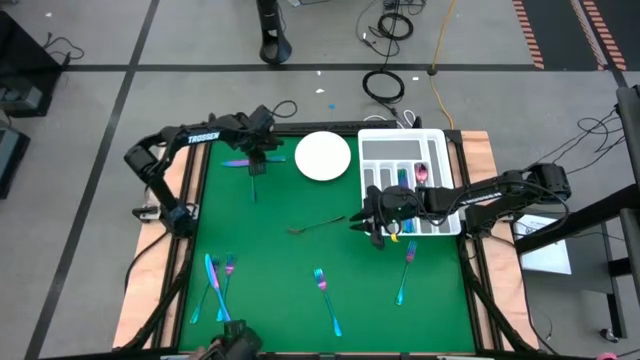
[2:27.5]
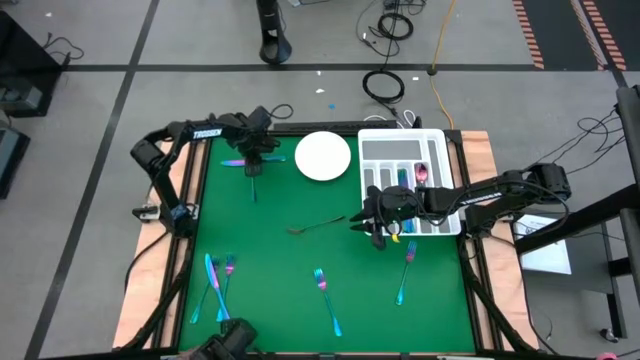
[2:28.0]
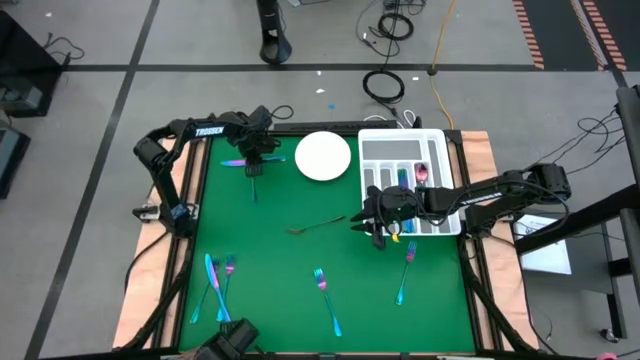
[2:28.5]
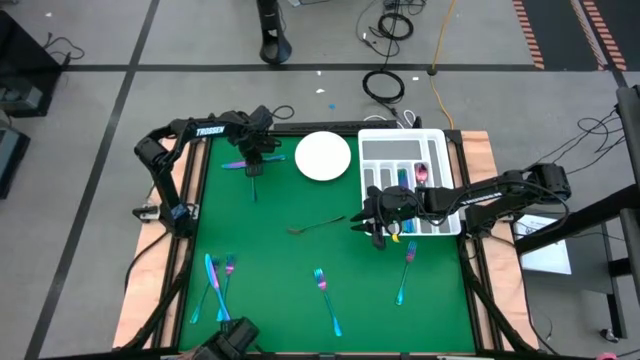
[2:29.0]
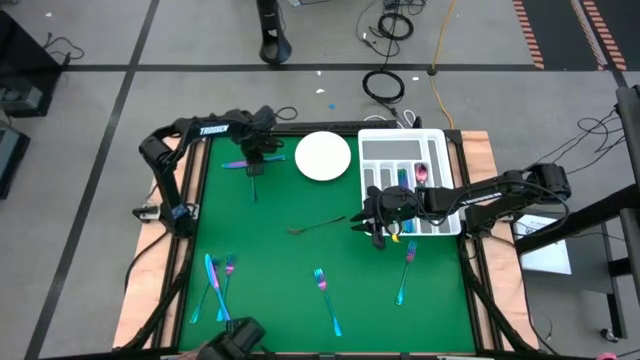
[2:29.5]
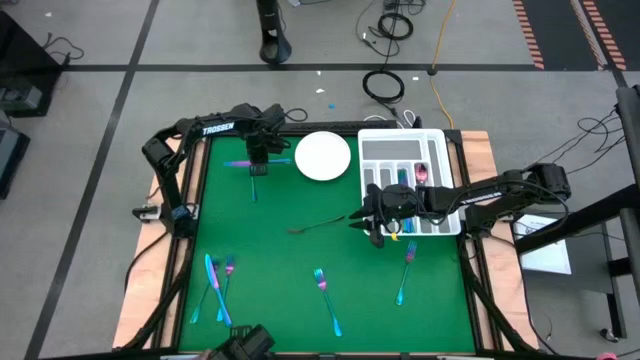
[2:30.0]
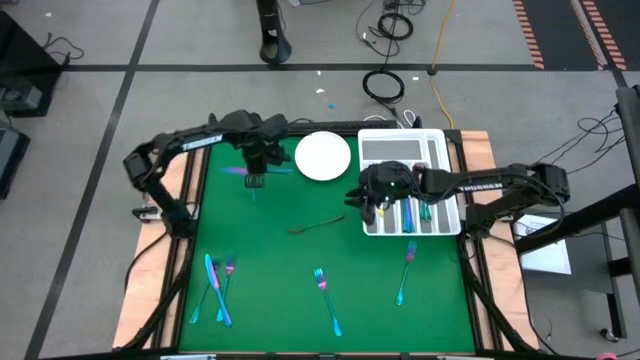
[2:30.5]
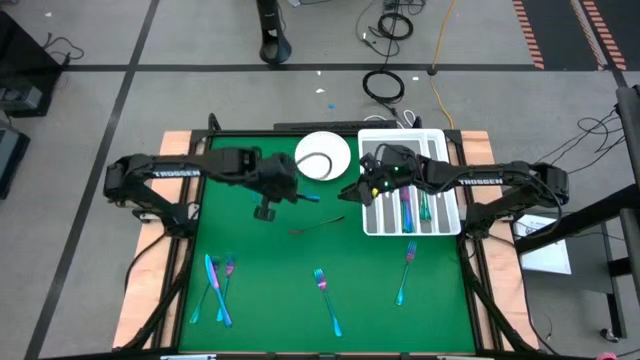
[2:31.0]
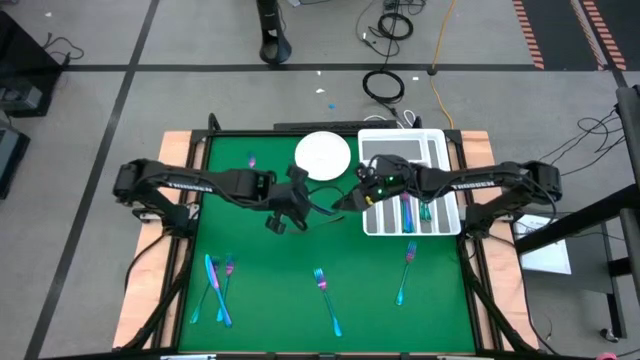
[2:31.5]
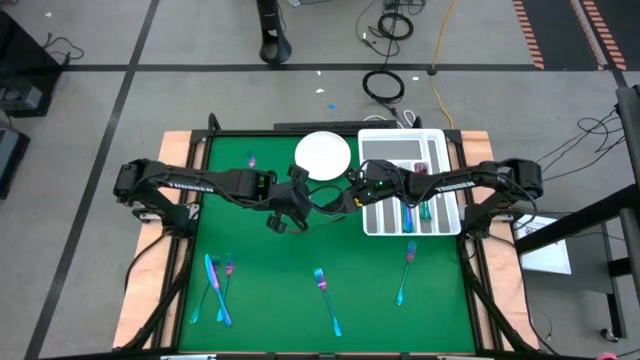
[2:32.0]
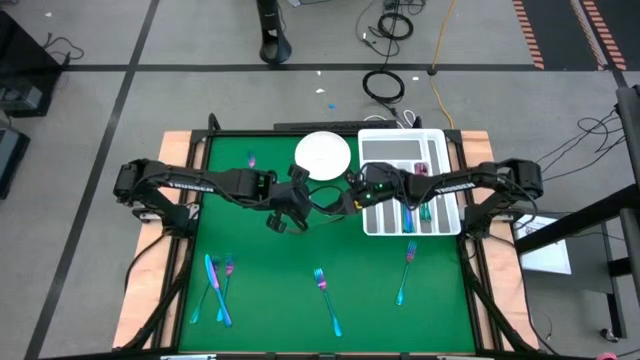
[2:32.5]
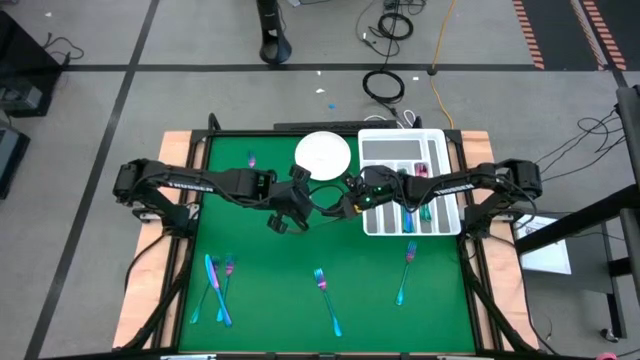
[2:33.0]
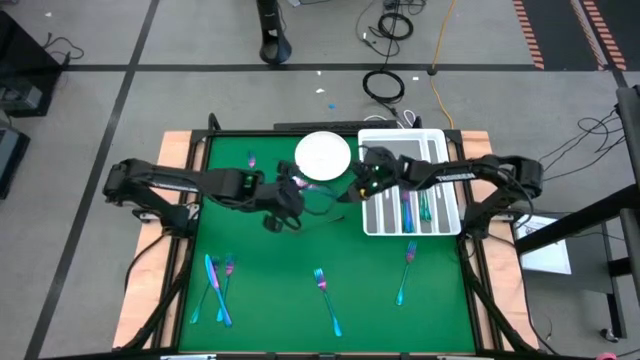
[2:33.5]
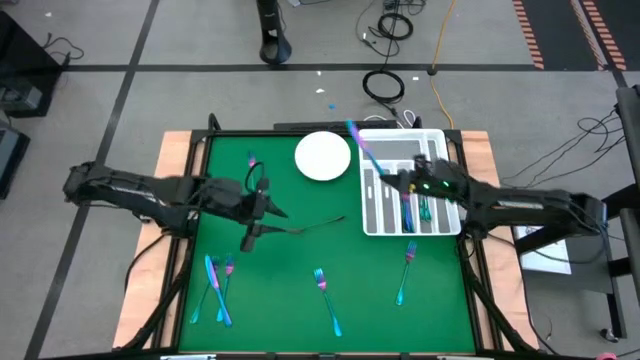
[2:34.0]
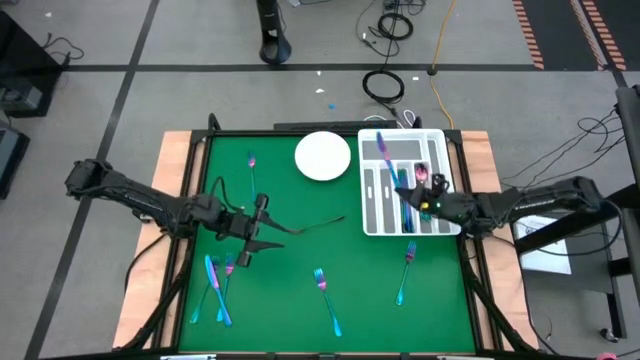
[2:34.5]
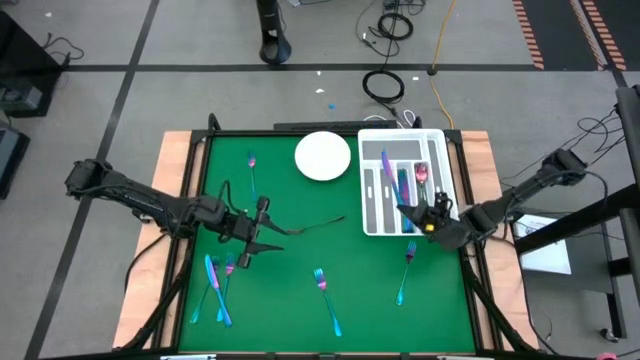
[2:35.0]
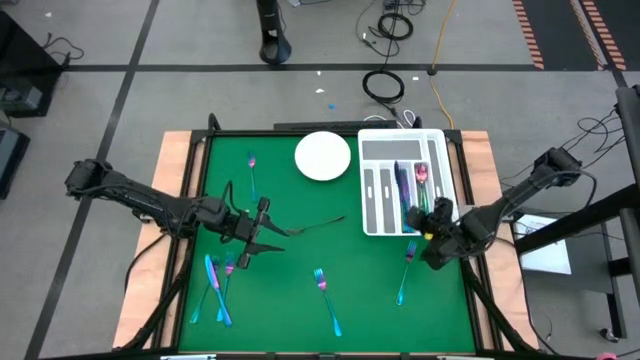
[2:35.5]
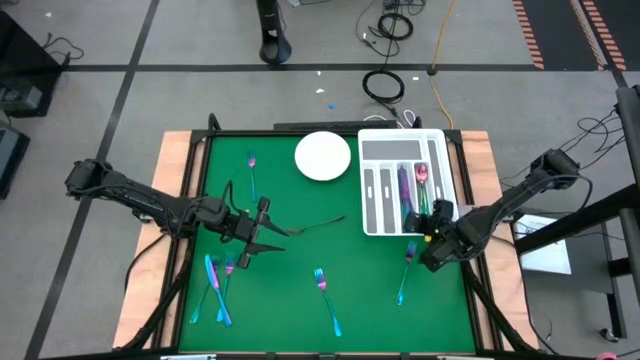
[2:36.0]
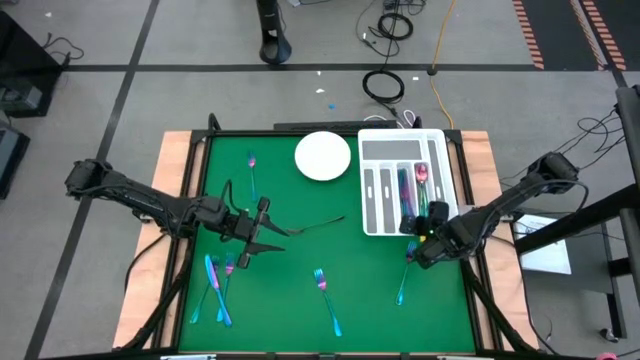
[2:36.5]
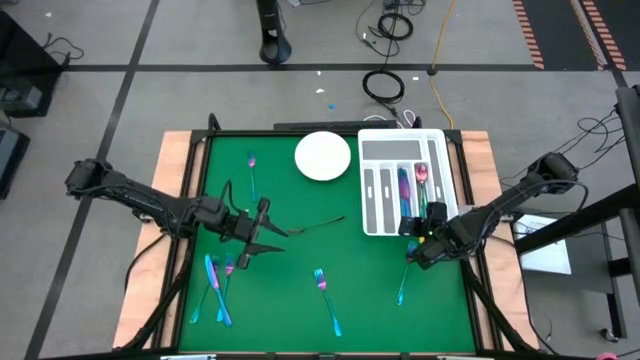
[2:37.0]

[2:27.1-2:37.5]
Task: Sort silverware
Put the iridescent knife into the white silverware tray

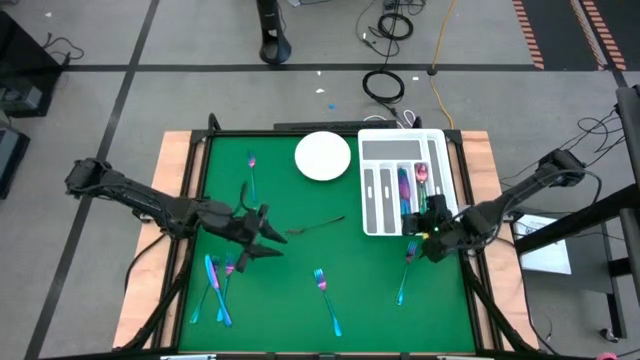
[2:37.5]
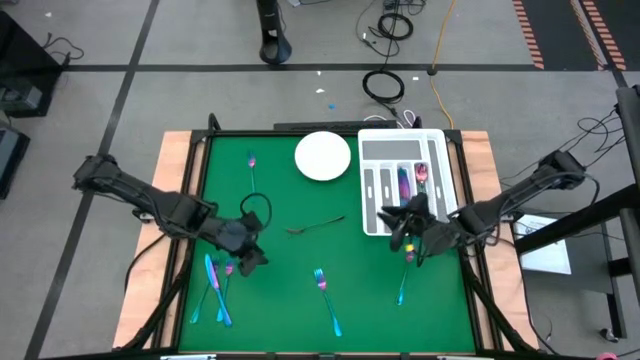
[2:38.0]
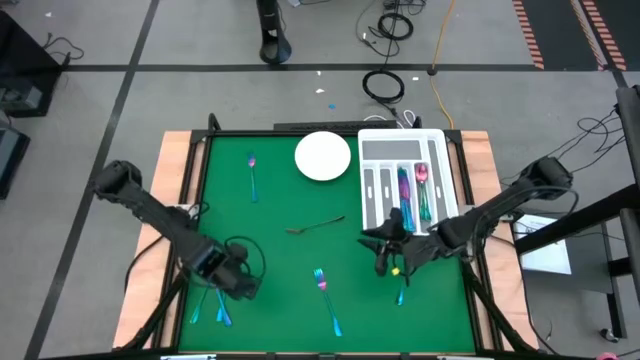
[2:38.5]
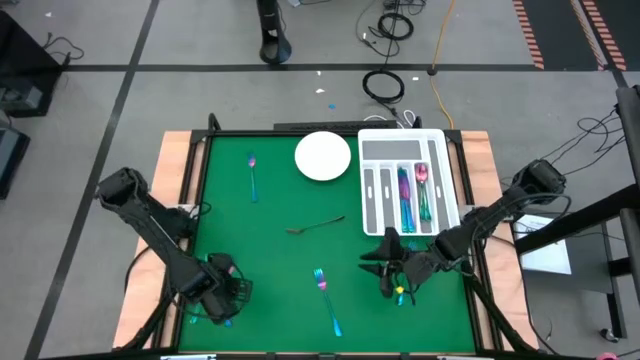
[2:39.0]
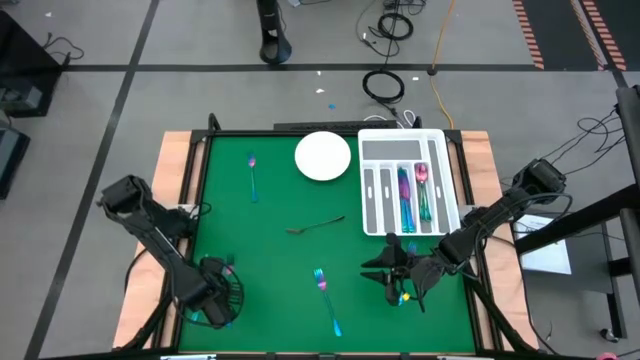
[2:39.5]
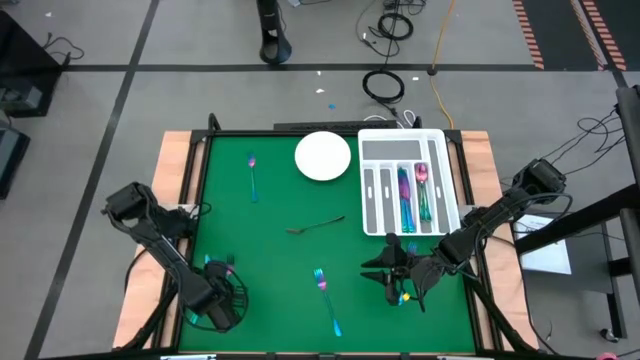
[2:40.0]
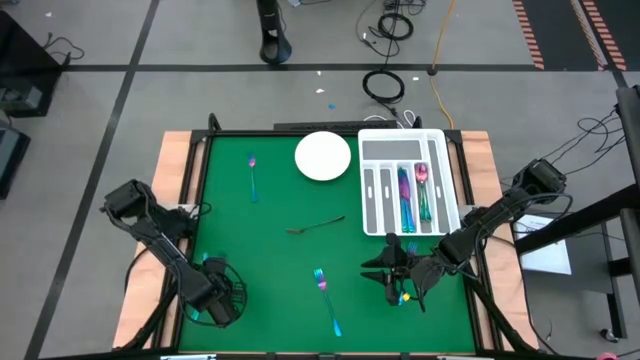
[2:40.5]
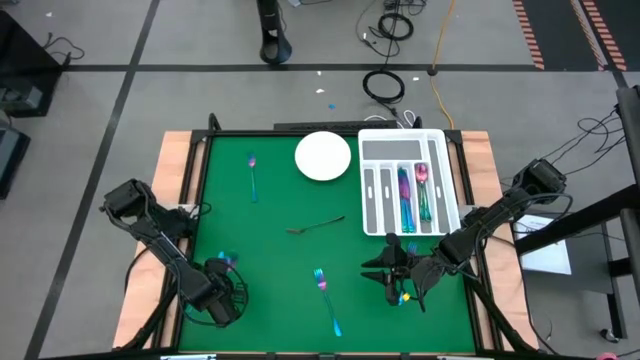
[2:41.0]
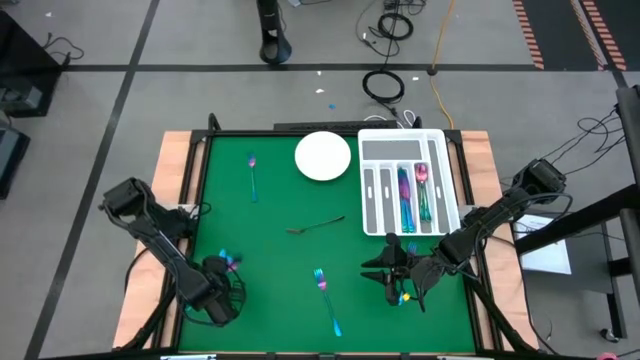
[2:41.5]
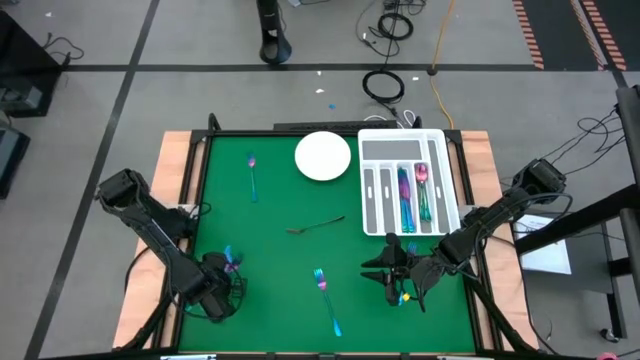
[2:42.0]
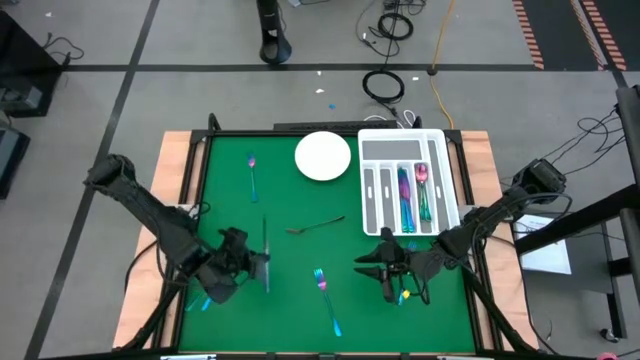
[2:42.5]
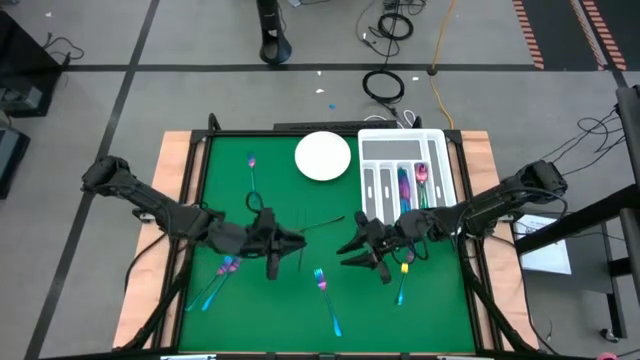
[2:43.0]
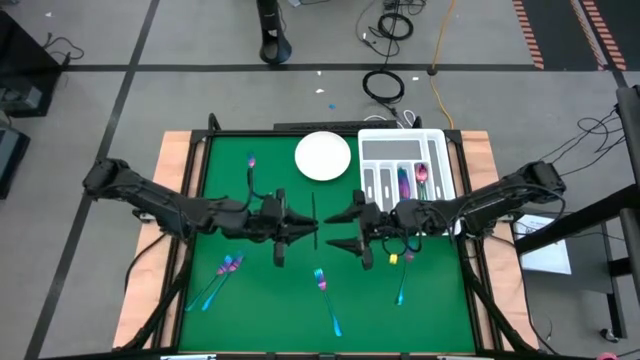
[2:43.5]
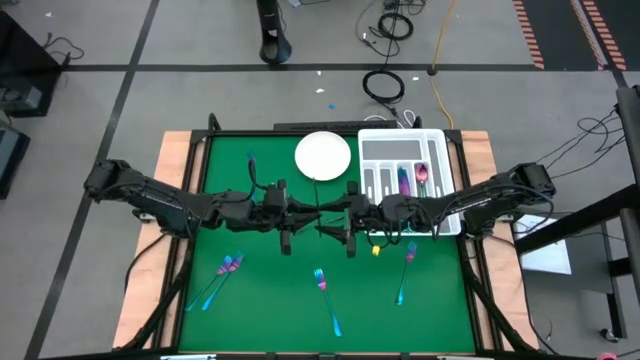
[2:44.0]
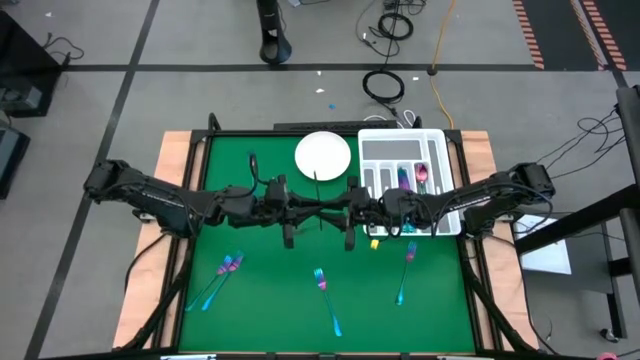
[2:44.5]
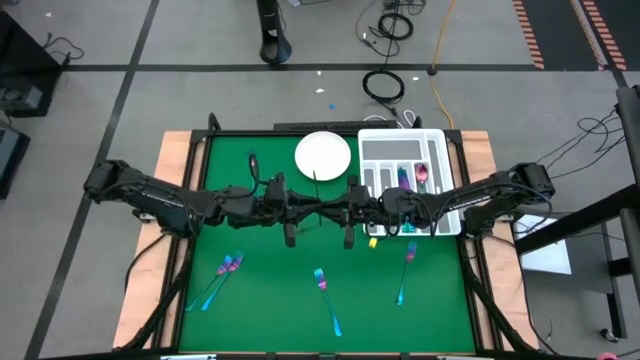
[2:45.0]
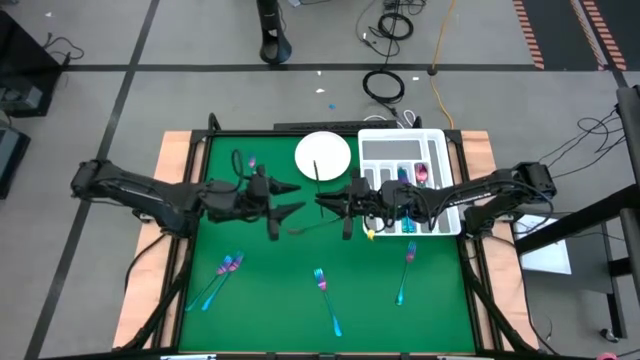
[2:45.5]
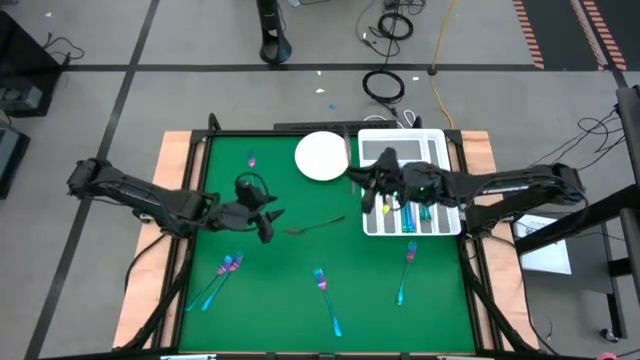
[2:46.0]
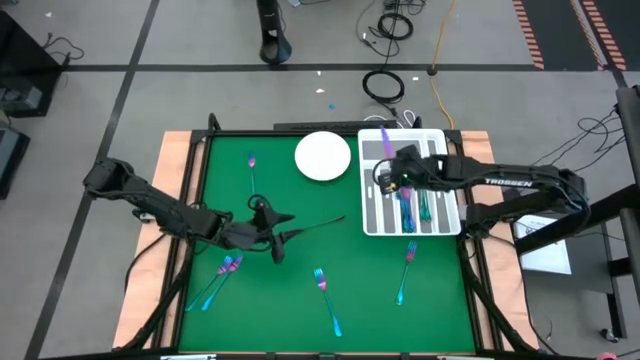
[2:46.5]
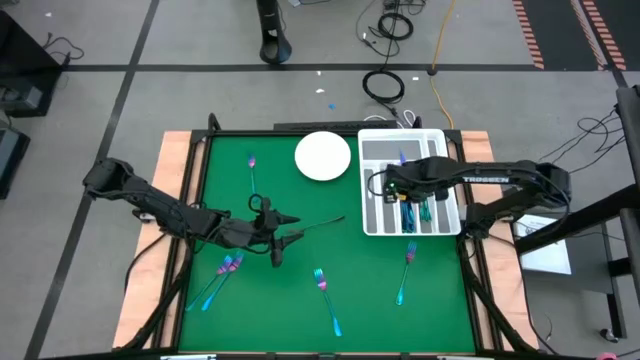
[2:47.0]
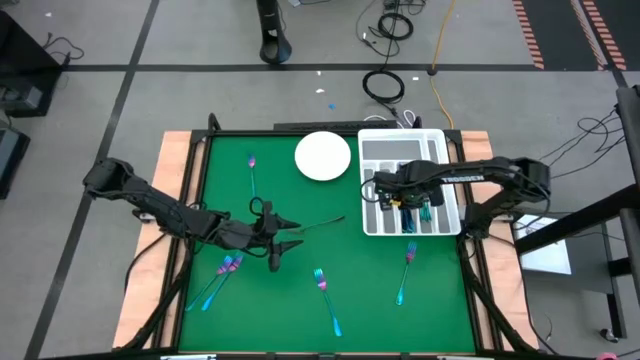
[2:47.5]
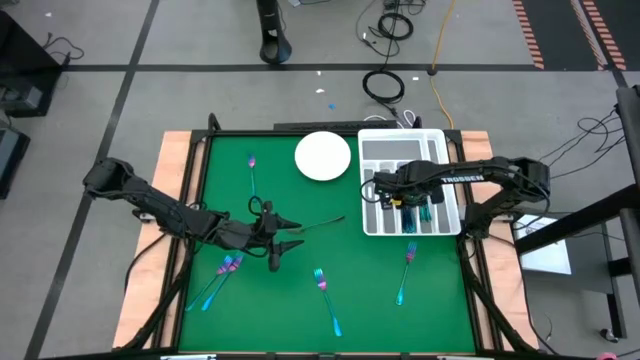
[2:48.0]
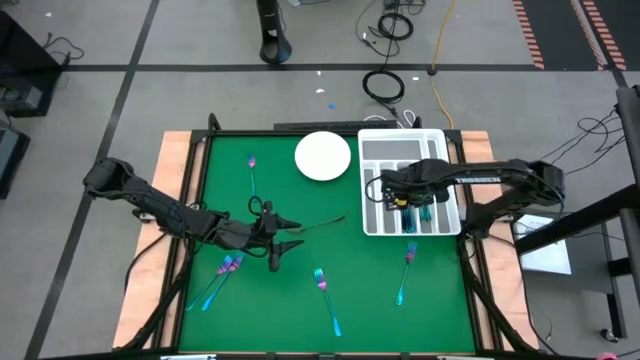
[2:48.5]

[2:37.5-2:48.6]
Put the iridescent knife into the white silverware tray

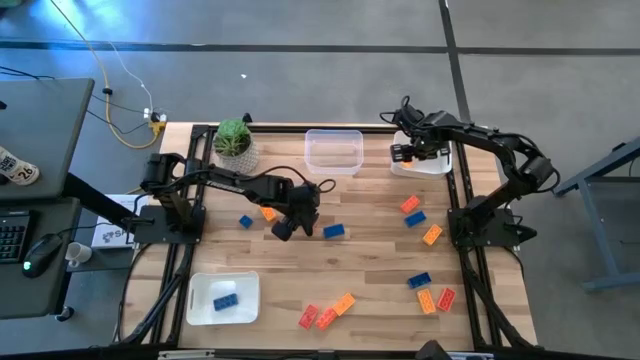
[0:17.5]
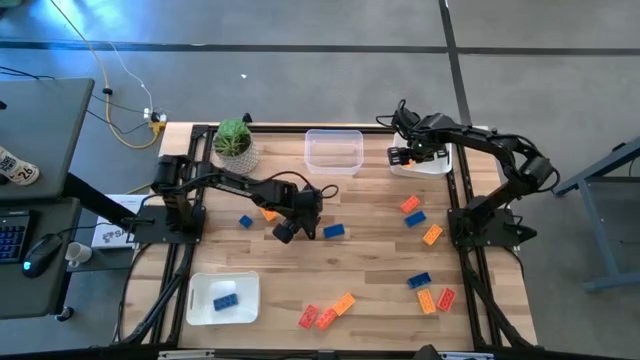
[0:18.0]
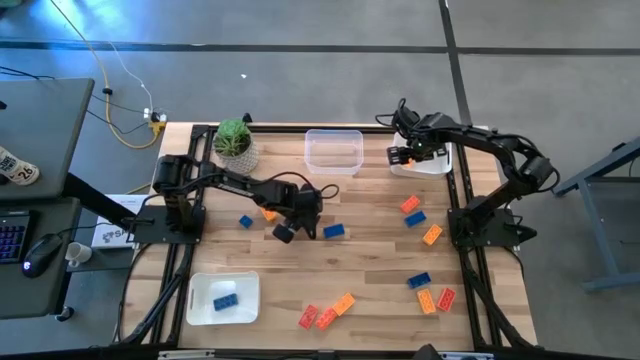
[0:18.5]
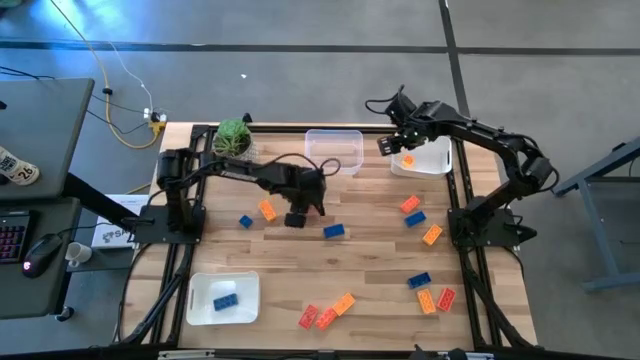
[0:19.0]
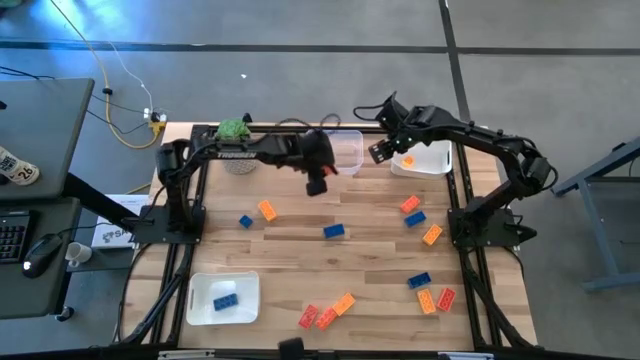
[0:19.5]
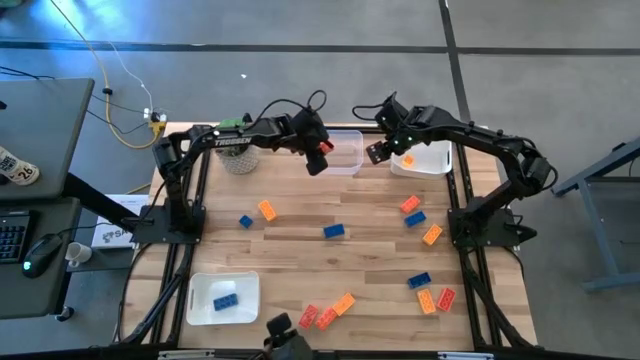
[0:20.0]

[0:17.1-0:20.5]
Task: Sort & place blocks by color
Put the orange game piece into the transparent bin
